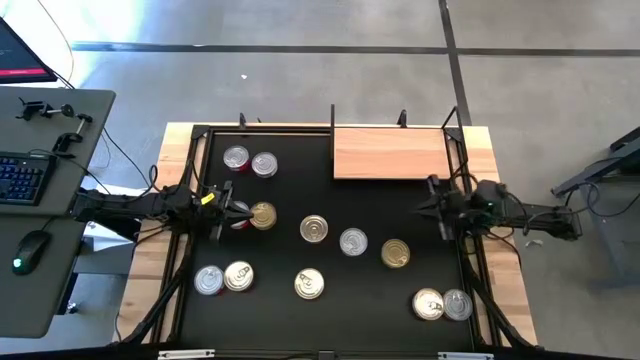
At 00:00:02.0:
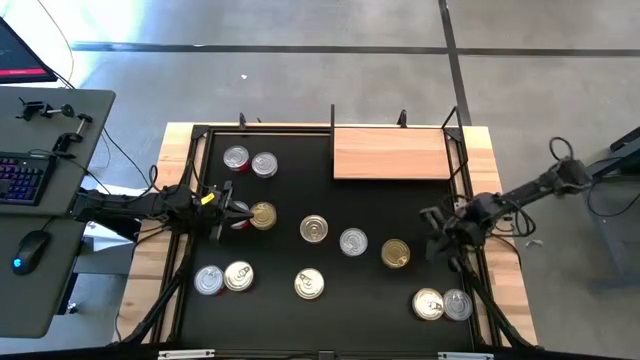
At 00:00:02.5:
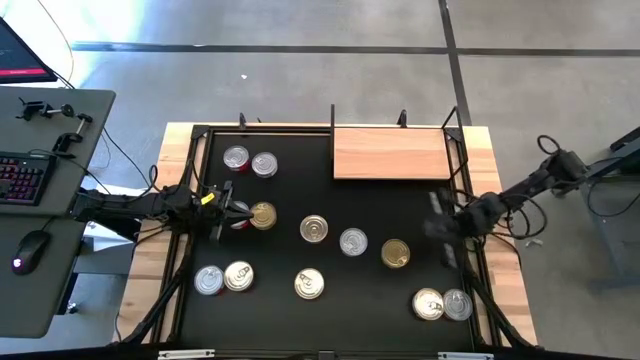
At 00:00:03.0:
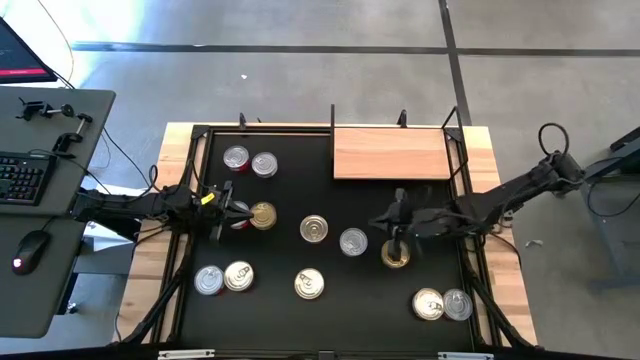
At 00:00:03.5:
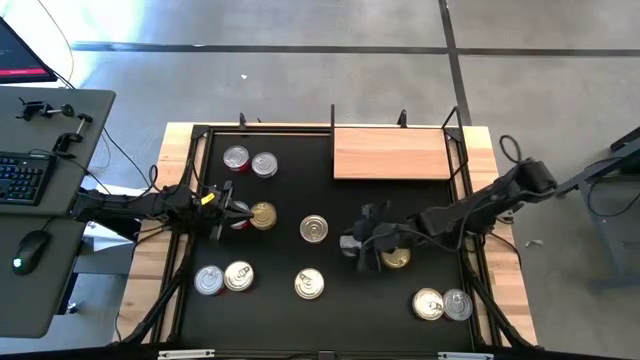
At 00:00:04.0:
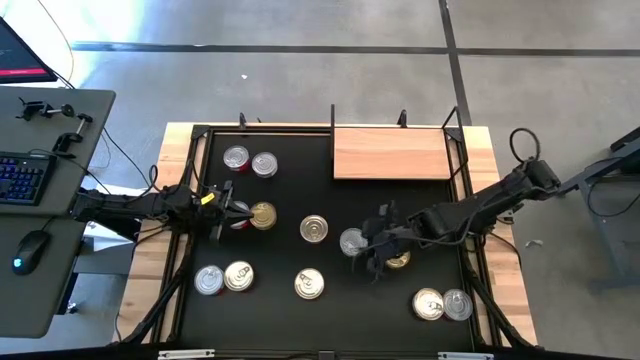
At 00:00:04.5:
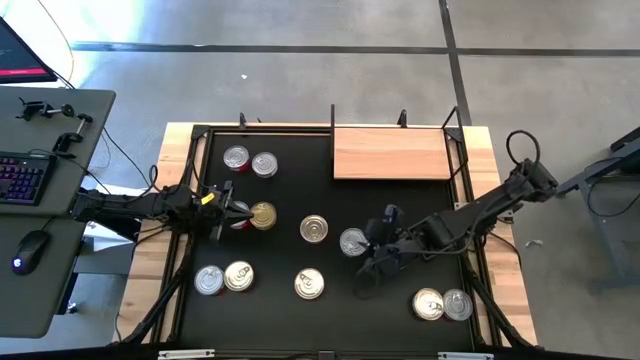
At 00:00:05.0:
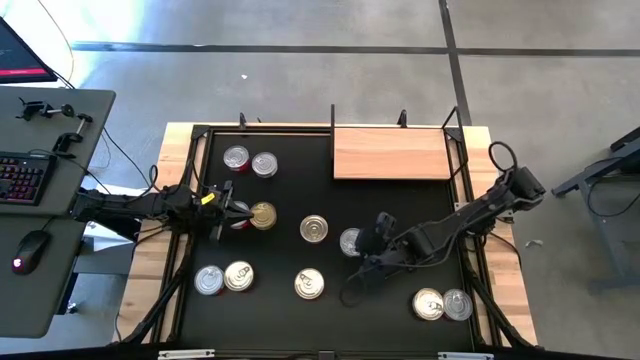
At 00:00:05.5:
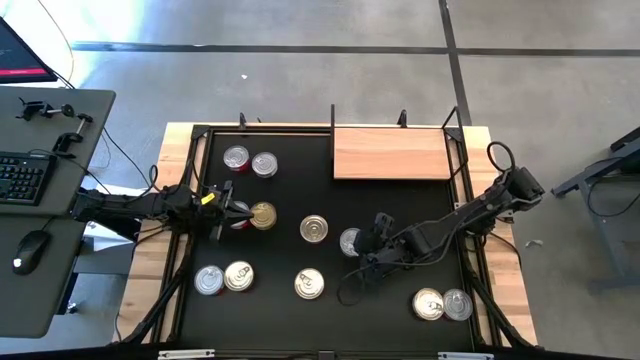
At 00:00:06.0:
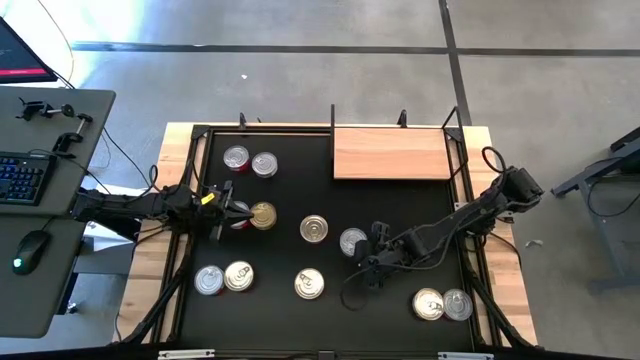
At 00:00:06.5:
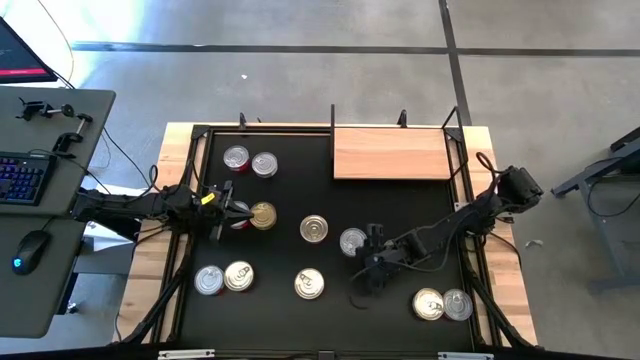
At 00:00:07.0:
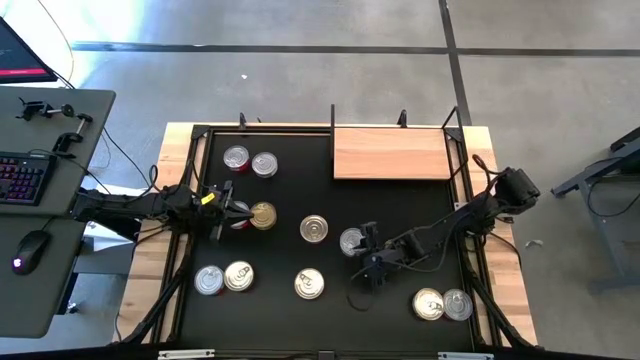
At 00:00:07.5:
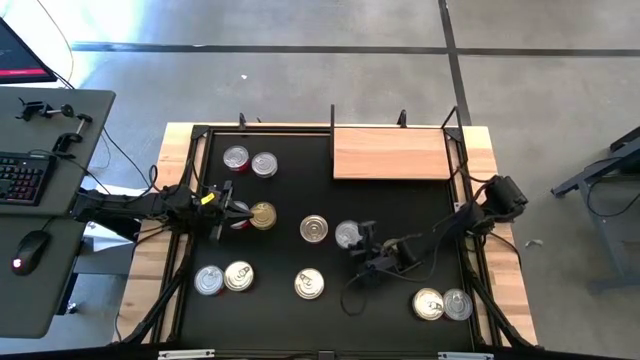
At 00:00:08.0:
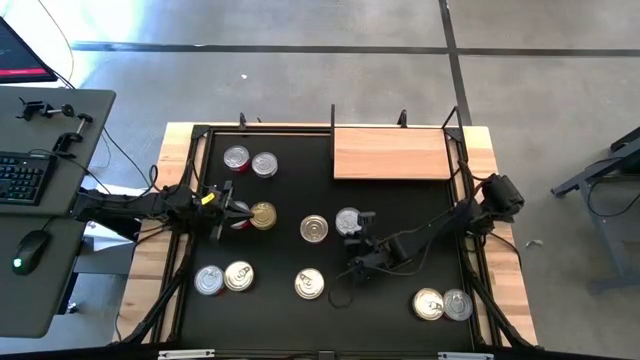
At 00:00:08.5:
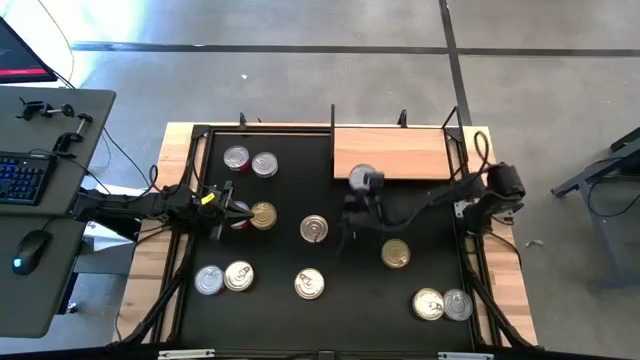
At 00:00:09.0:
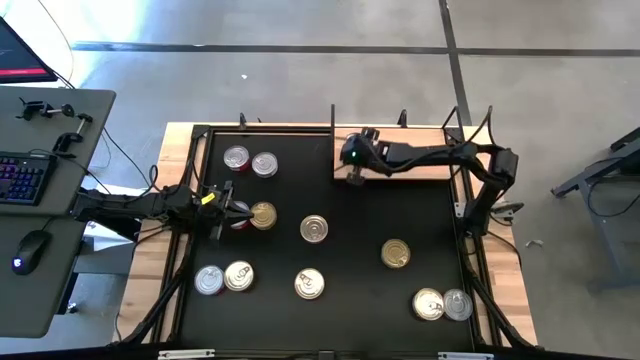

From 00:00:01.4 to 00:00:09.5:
Task: Stack canned seafood by type on shelf
Put the green tuna can on the shelf

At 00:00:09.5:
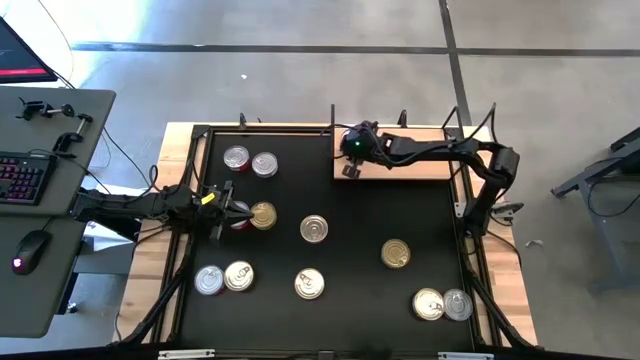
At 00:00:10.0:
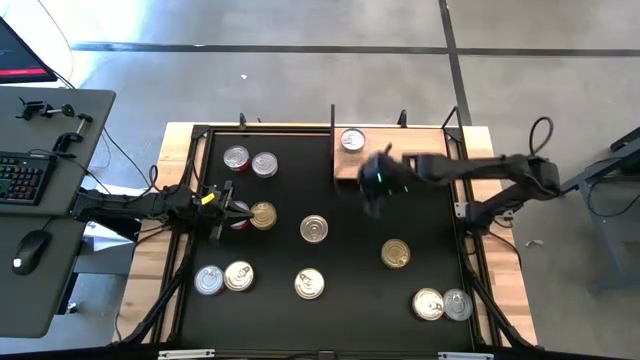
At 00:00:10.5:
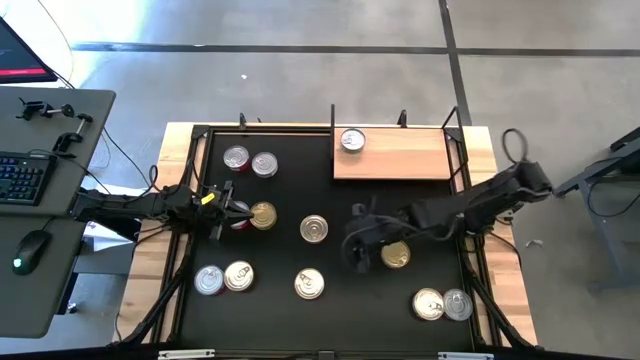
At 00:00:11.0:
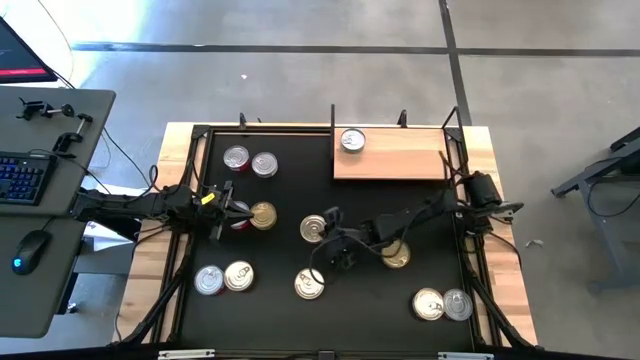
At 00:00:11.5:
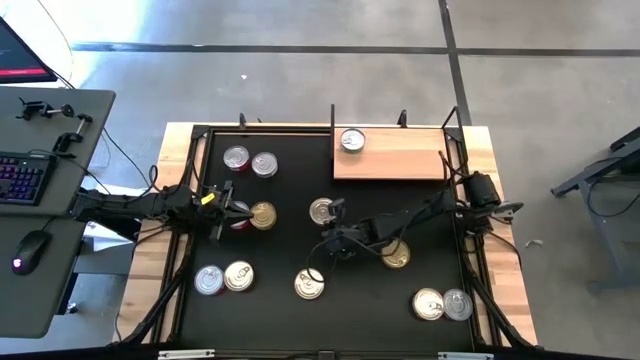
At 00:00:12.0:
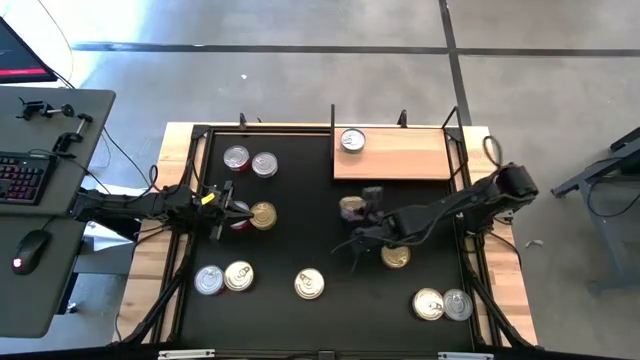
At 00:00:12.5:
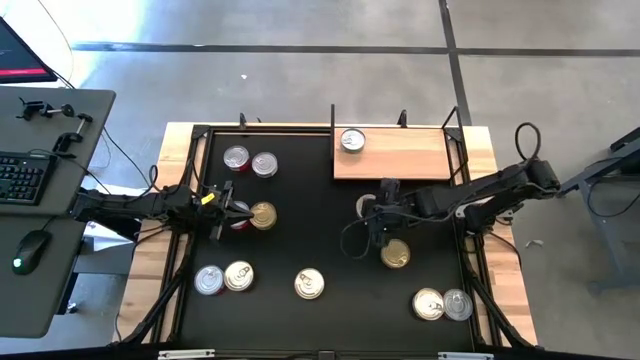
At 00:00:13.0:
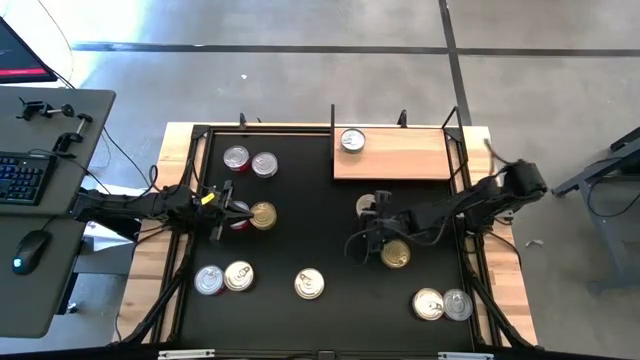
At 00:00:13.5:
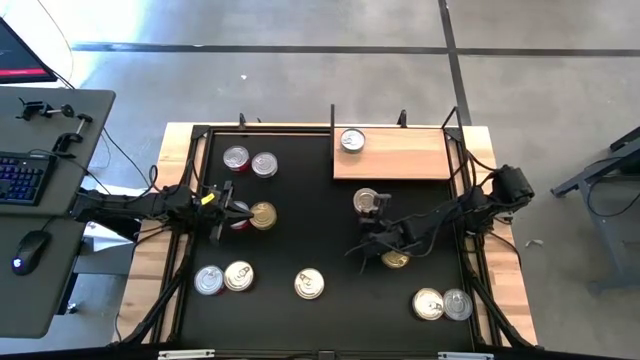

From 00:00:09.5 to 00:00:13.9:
Put the blue-pink tuna can on the shelf

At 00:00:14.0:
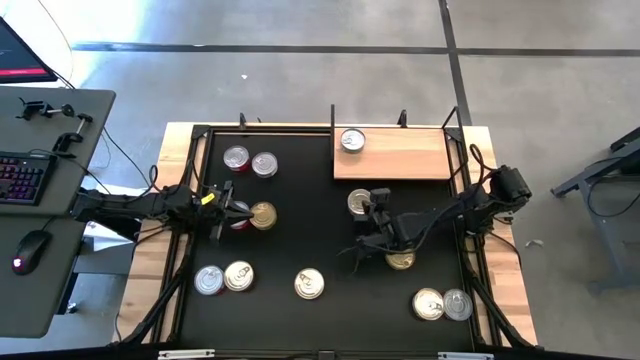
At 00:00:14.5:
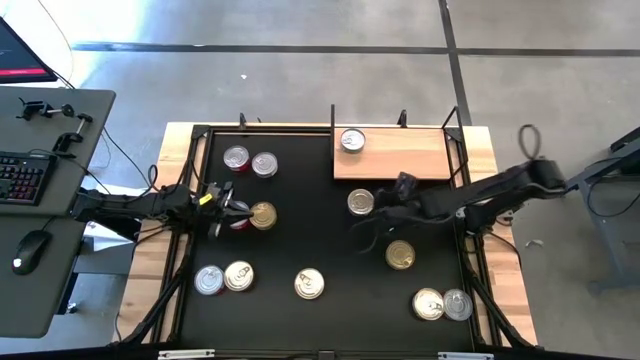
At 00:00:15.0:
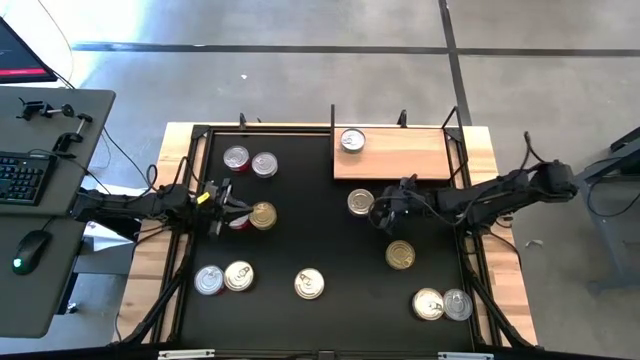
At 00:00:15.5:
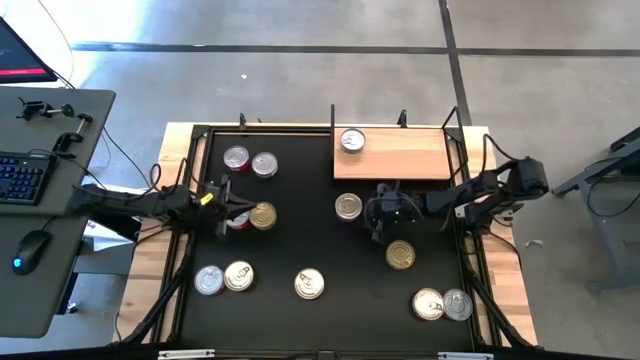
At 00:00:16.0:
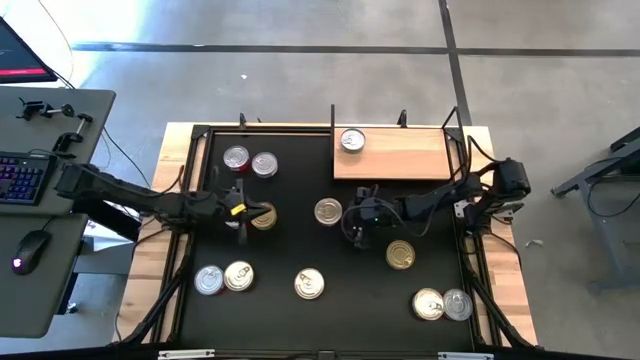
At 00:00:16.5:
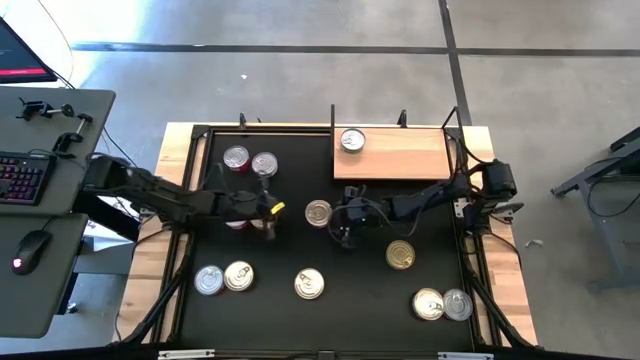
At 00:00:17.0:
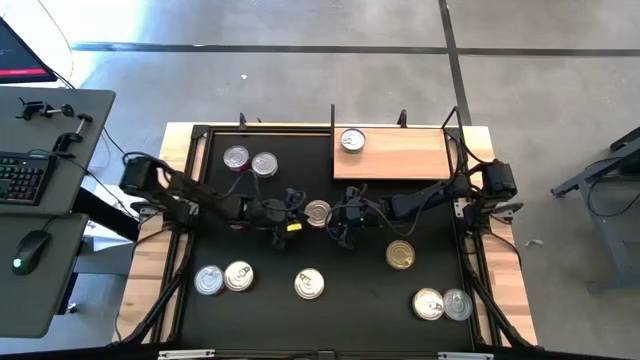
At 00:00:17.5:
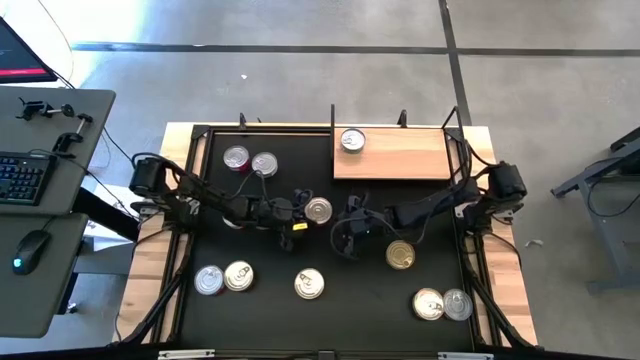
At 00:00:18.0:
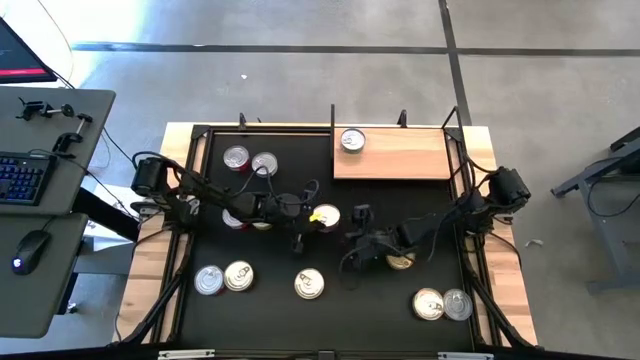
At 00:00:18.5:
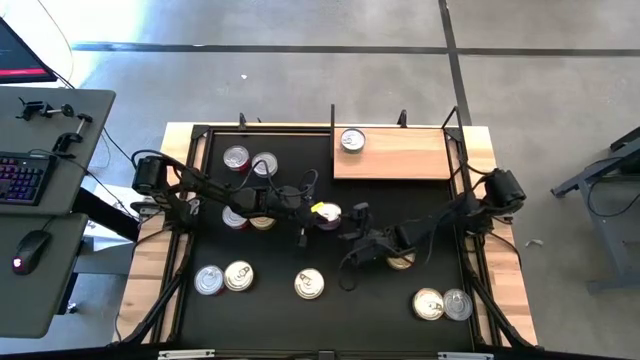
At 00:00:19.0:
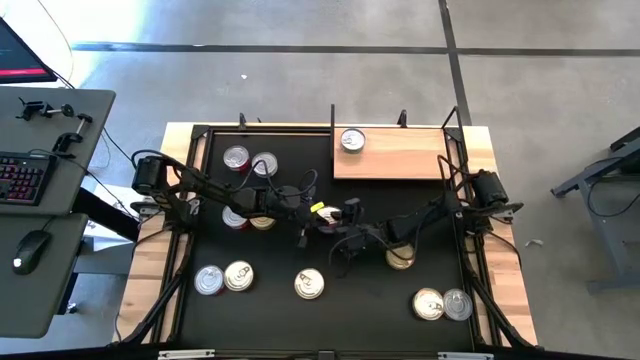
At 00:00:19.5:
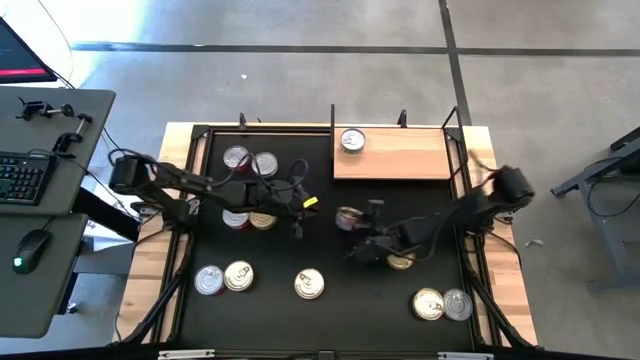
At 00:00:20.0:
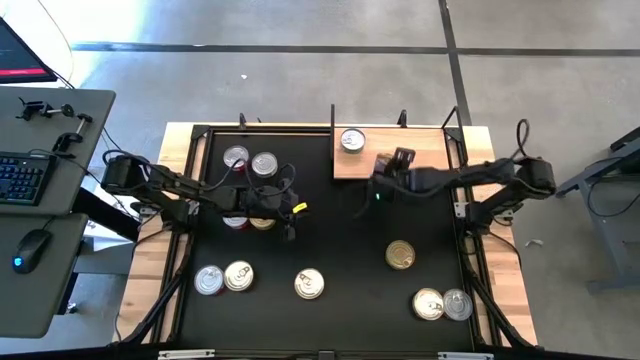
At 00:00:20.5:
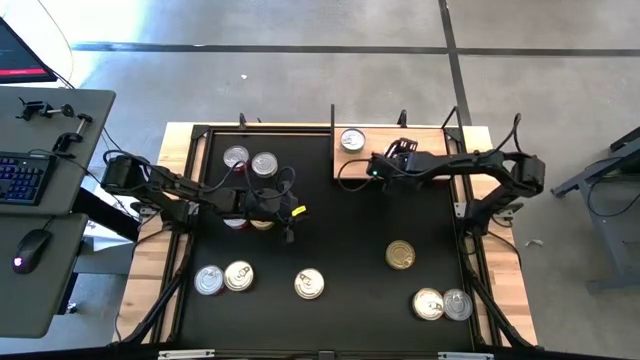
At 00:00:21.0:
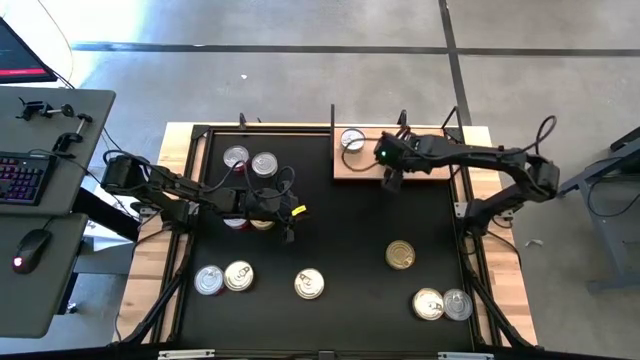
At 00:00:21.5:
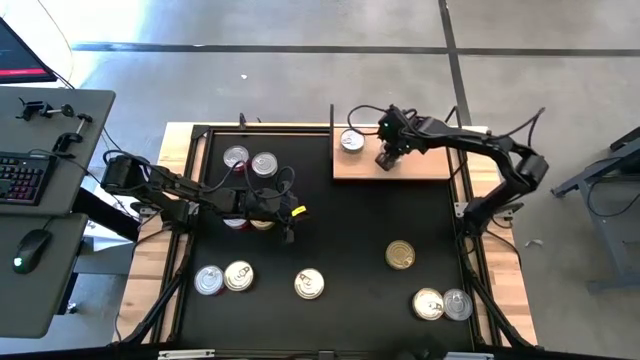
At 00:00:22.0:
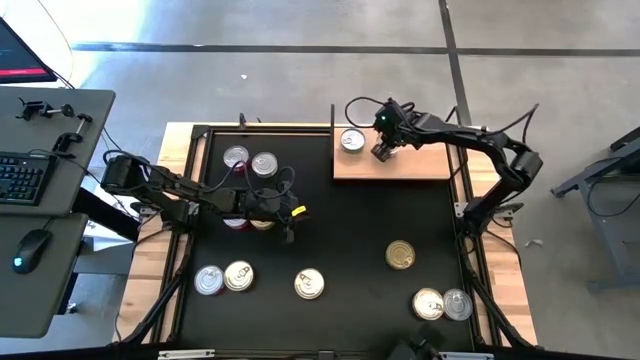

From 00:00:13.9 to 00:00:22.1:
Put the blue-pink tuna can on the shelf
